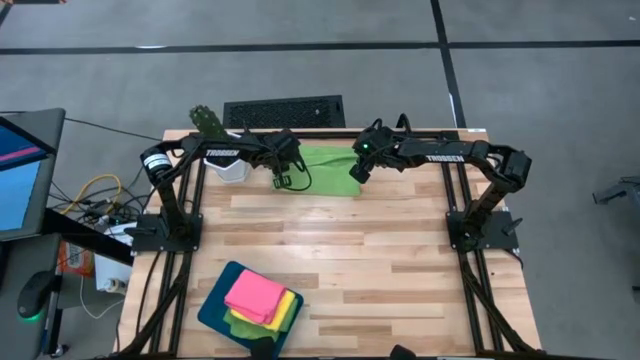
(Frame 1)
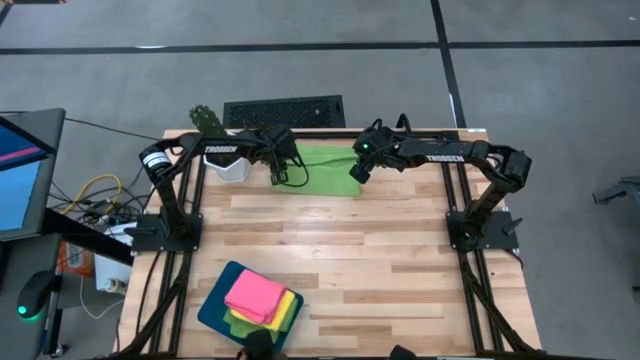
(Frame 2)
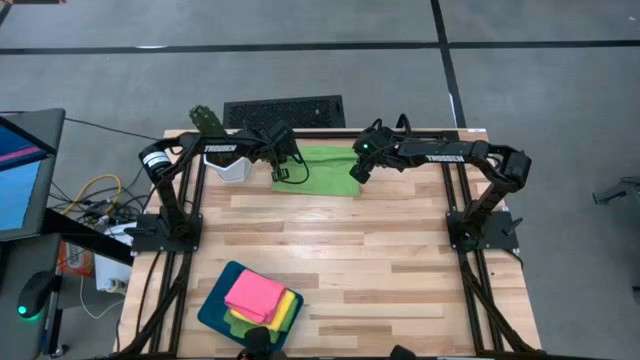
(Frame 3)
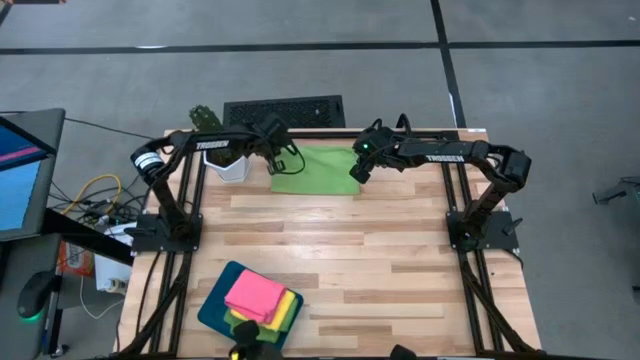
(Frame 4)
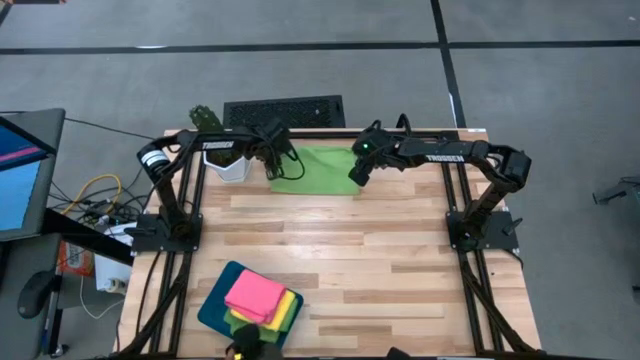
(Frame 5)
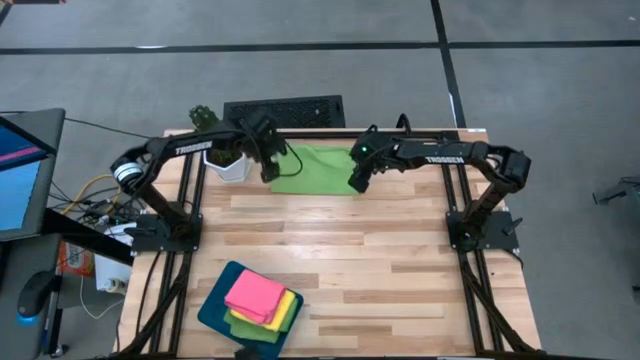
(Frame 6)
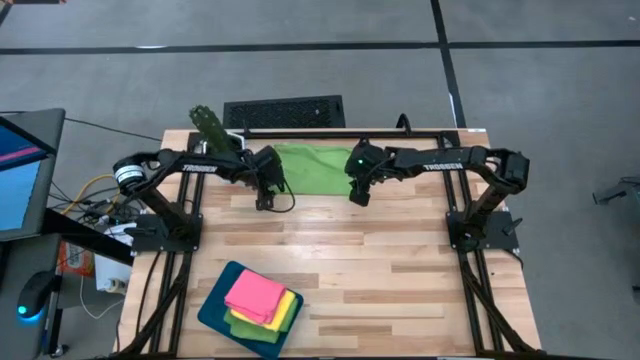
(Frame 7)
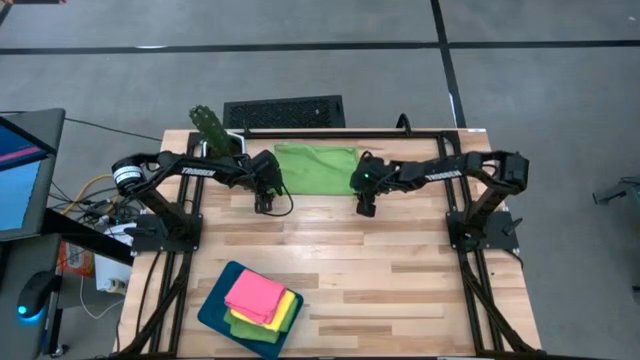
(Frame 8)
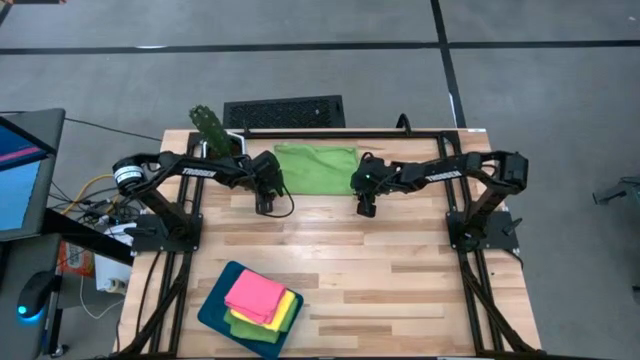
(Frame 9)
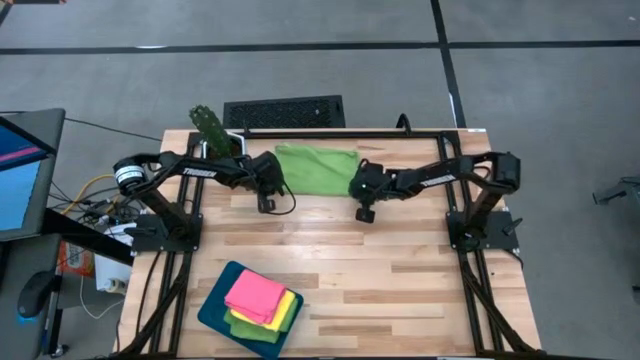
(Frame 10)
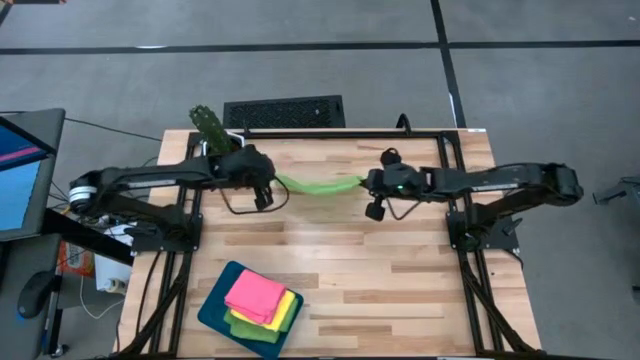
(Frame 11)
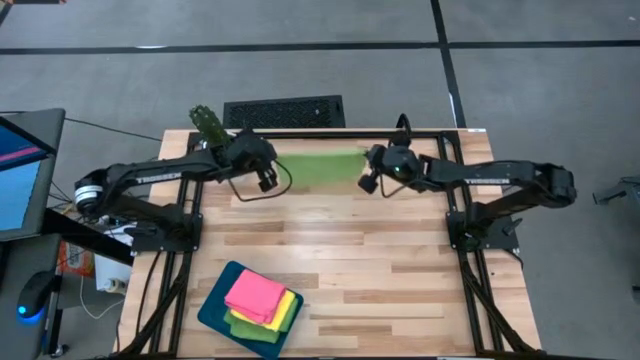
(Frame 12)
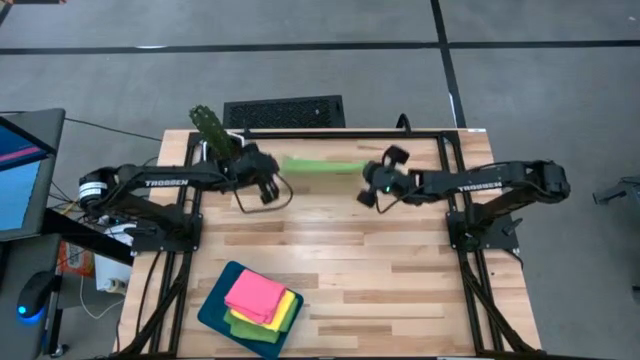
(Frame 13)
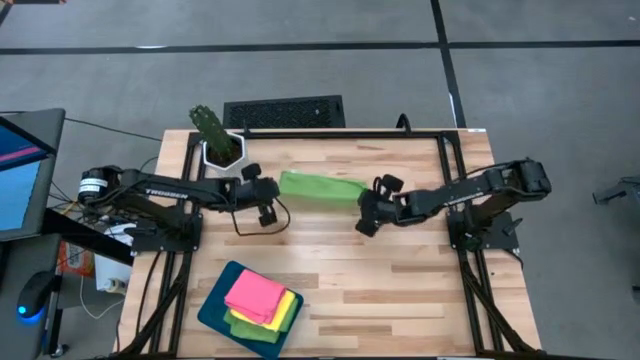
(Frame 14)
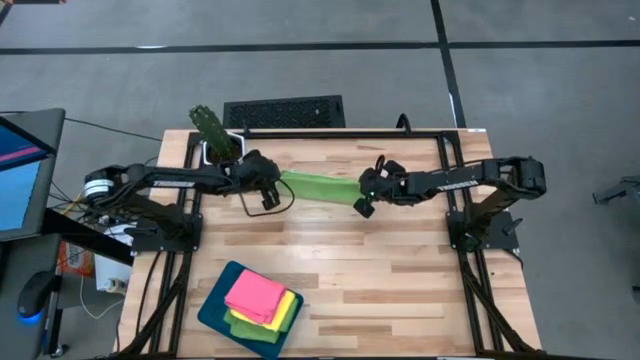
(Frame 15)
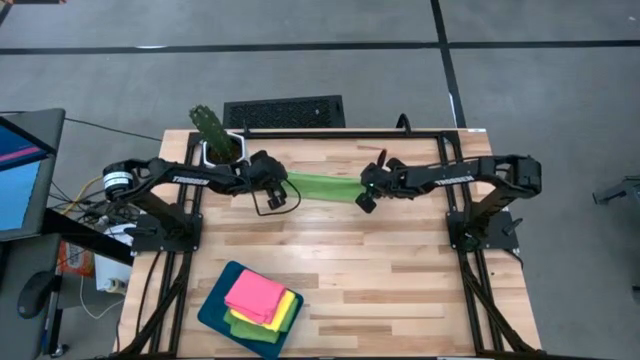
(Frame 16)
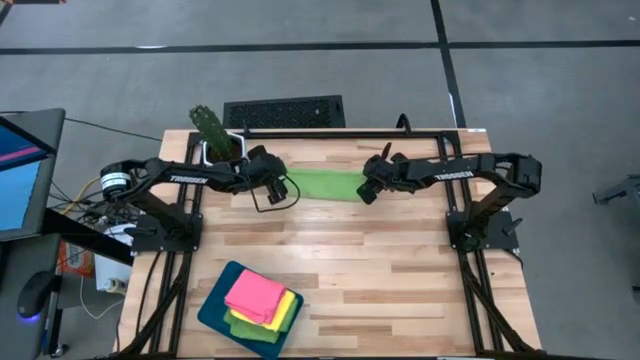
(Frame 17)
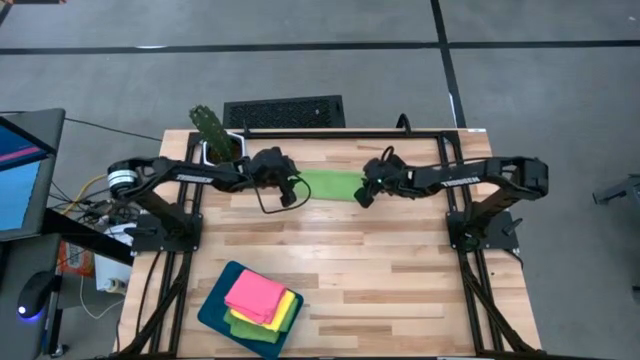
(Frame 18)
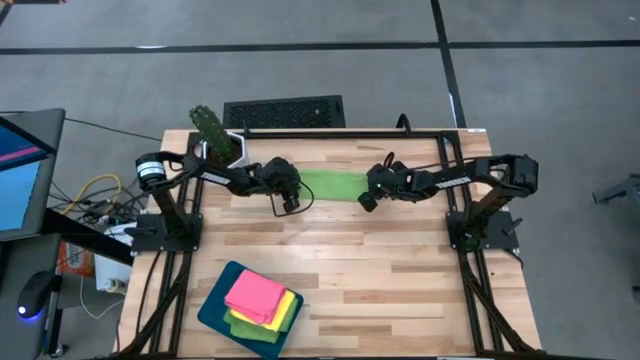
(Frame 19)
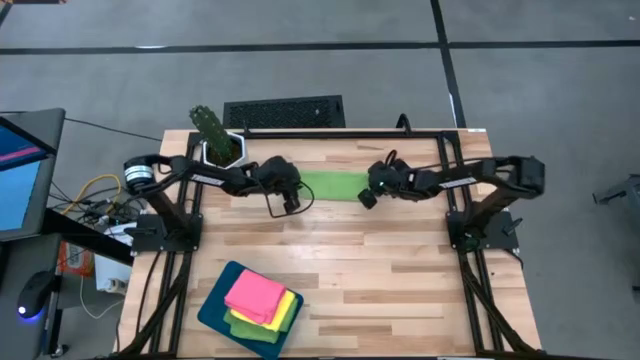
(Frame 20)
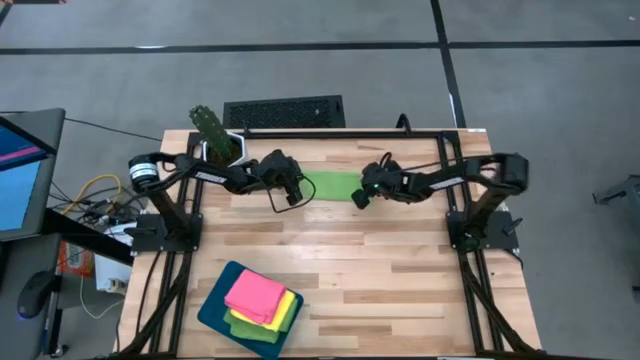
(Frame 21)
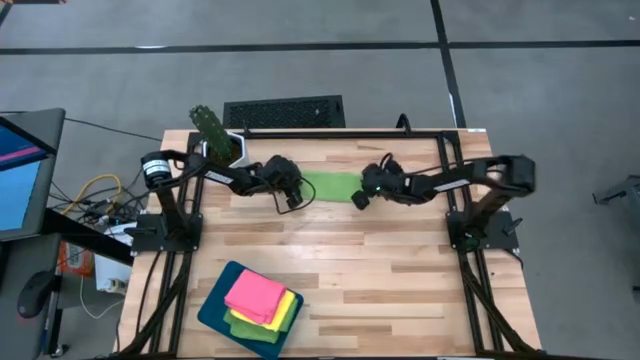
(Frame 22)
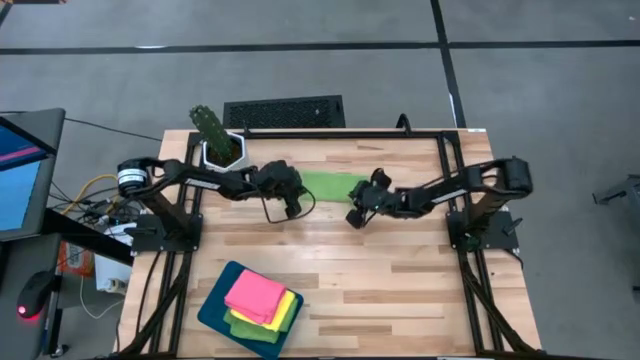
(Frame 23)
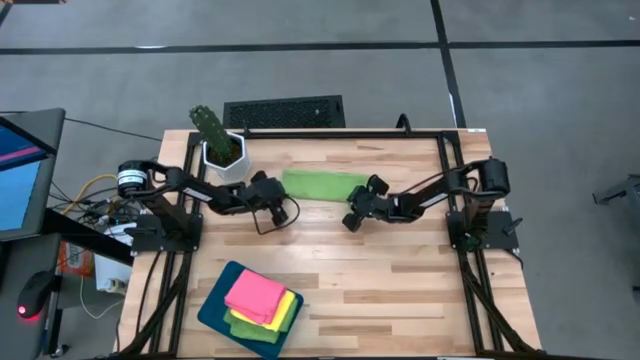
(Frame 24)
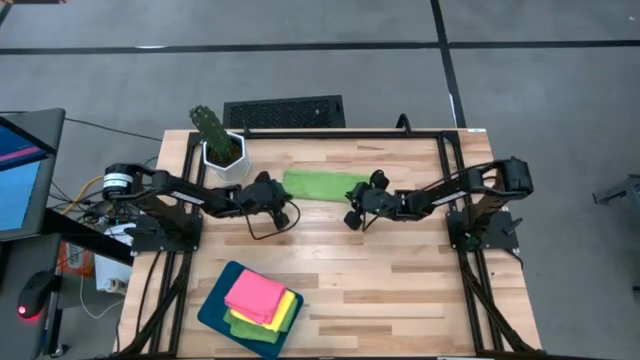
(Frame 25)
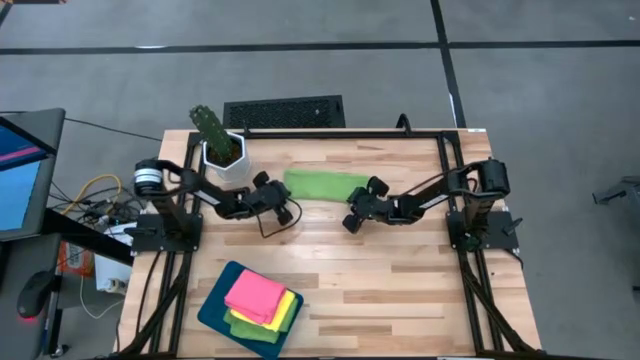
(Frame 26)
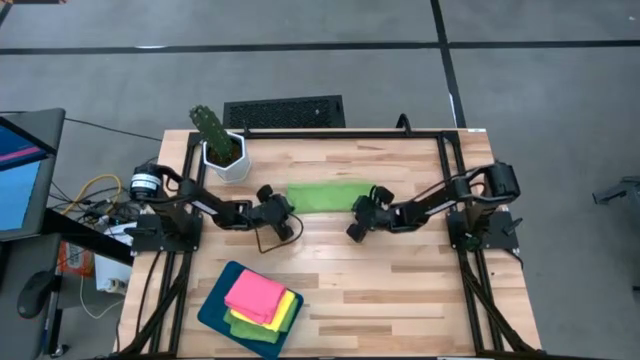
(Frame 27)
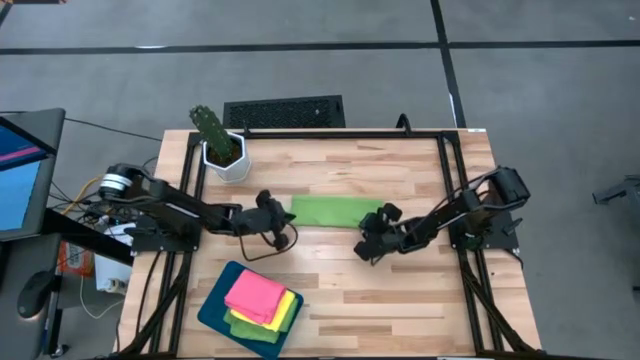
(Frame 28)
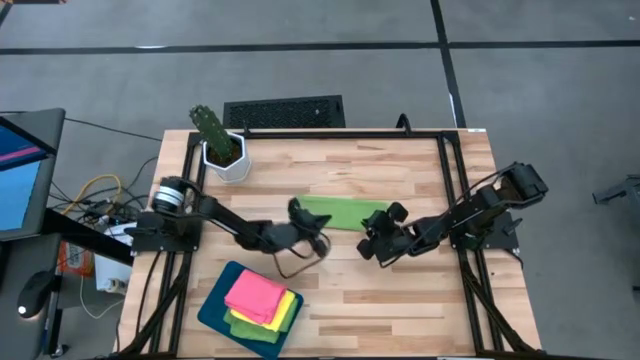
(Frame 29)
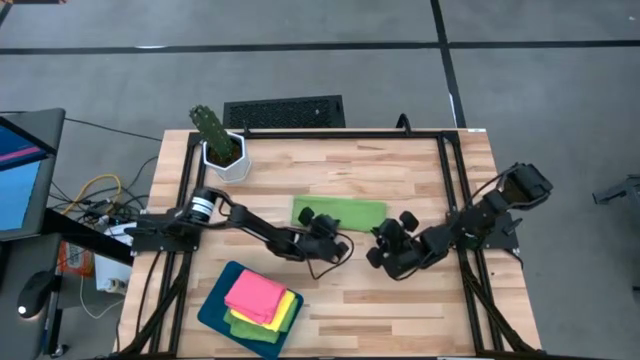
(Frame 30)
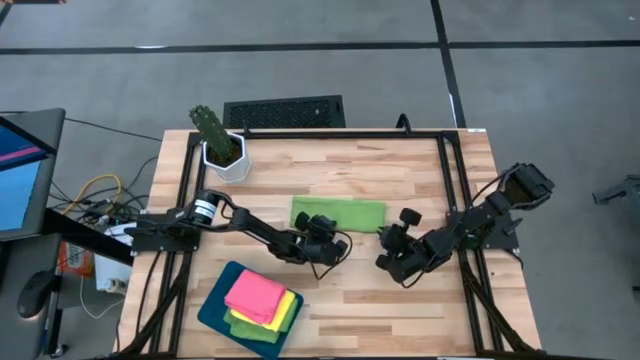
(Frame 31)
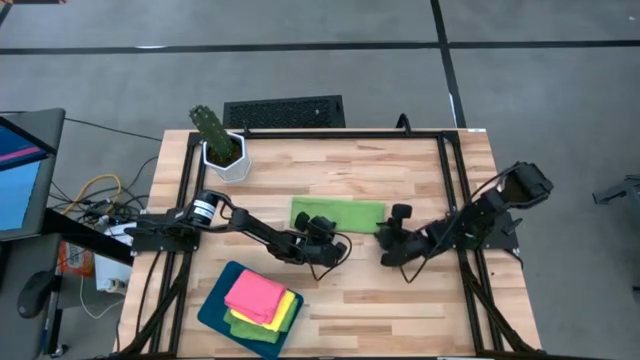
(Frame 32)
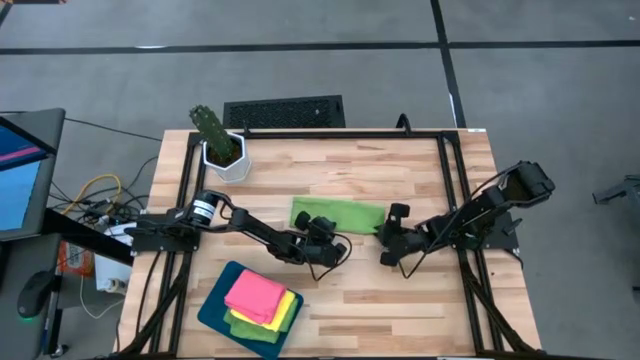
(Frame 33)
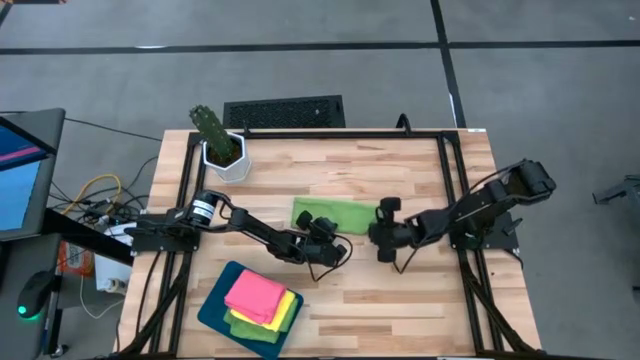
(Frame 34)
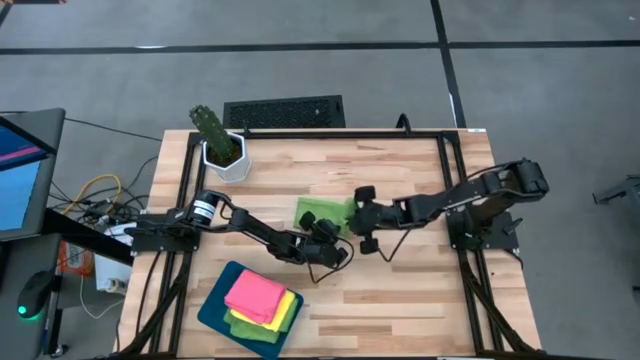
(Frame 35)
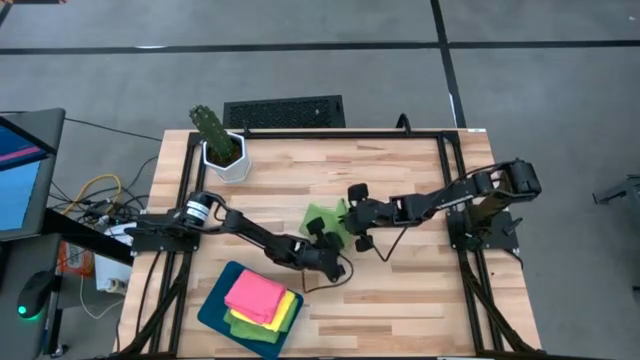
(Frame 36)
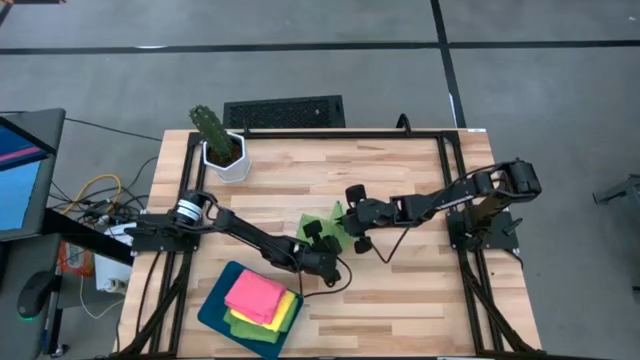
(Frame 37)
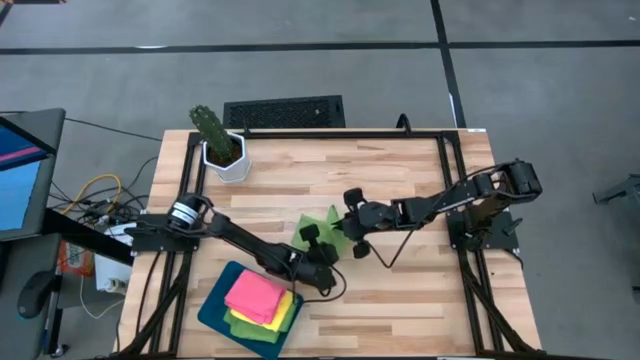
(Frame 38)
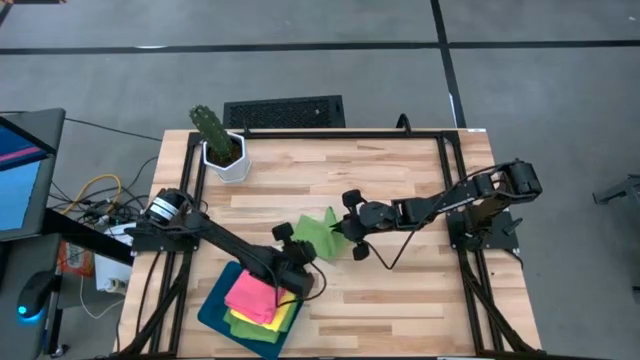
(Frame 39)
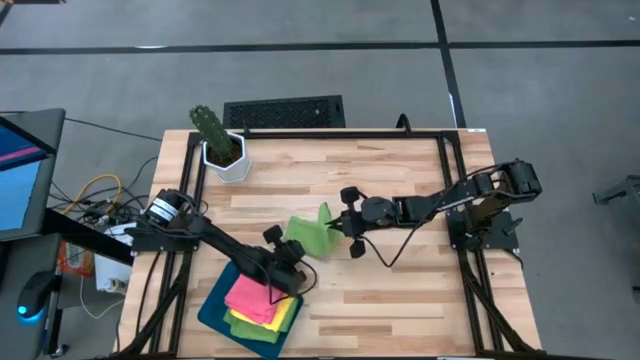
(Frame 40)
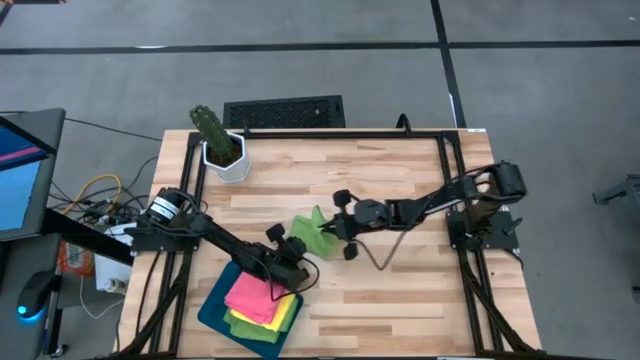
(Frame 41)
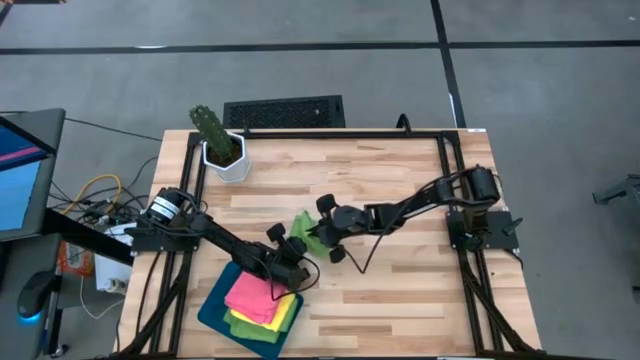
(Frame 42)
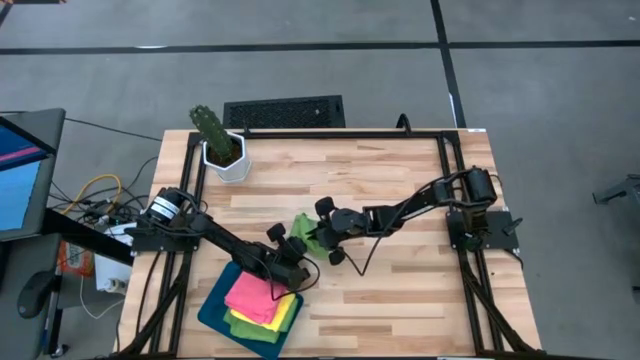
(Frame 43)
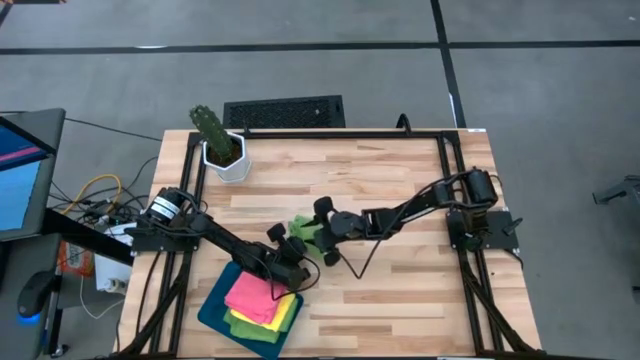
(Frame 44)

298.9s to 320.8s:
Task: Fold microfiber towels
Fold the green microfiber
